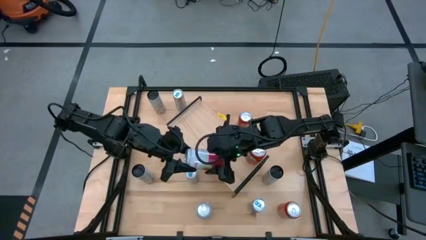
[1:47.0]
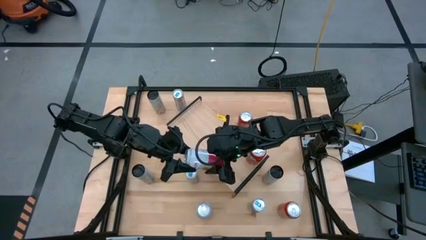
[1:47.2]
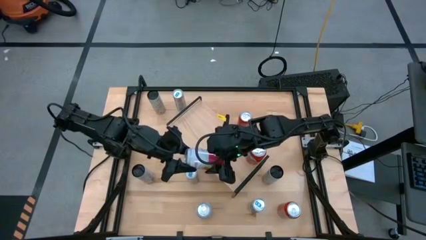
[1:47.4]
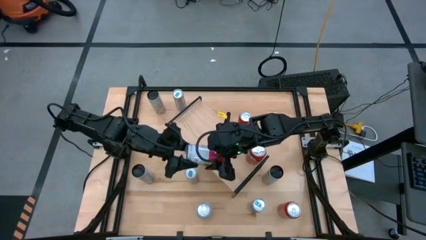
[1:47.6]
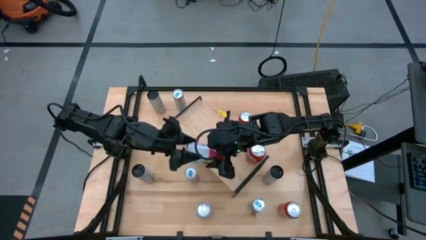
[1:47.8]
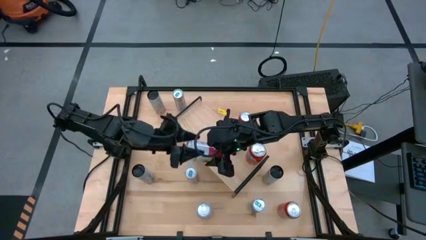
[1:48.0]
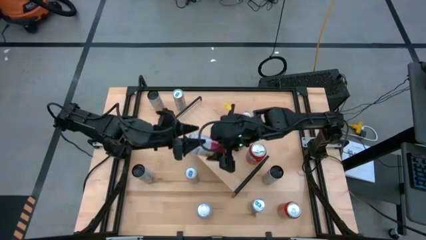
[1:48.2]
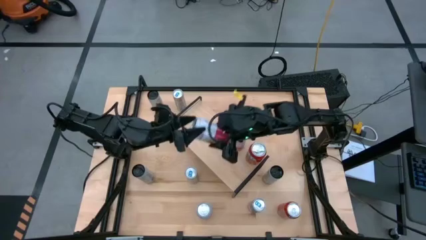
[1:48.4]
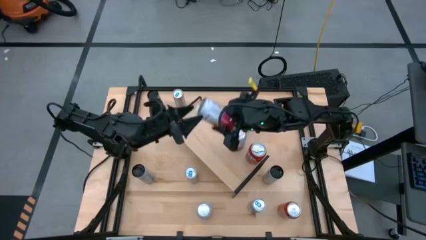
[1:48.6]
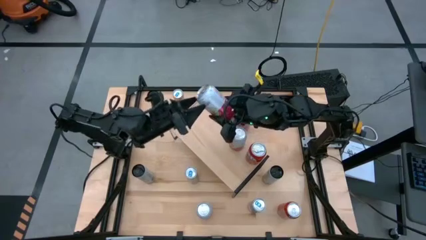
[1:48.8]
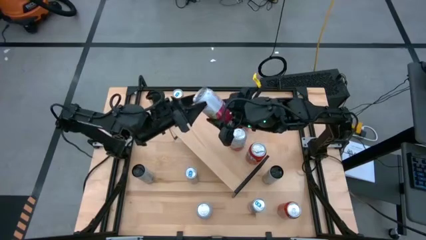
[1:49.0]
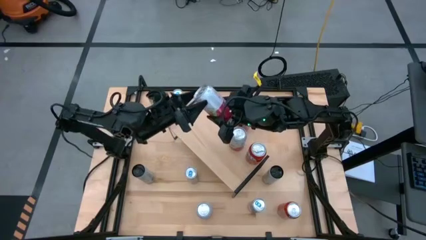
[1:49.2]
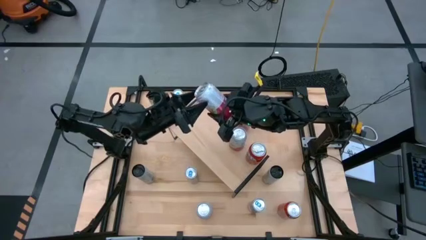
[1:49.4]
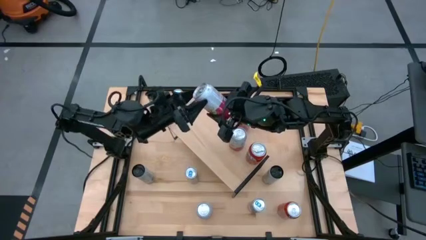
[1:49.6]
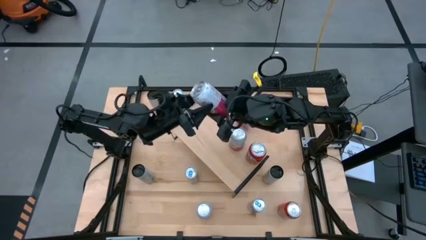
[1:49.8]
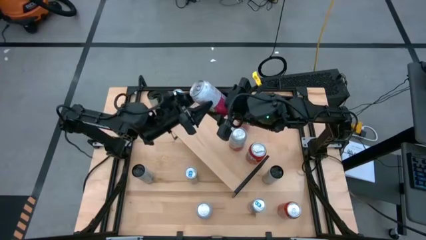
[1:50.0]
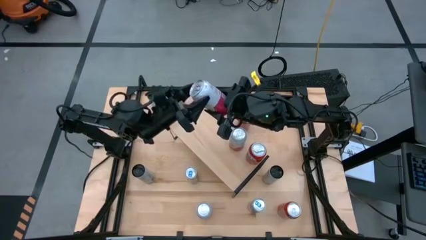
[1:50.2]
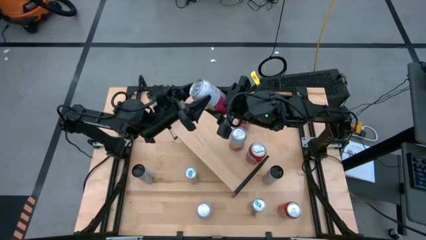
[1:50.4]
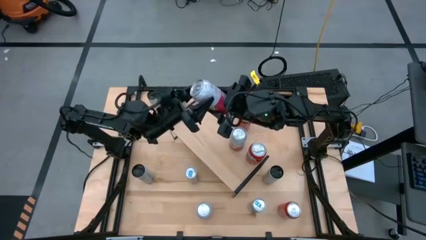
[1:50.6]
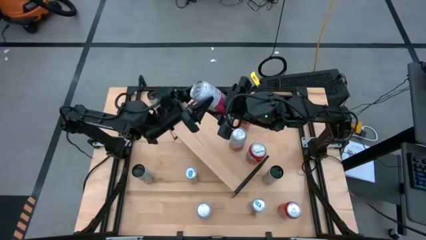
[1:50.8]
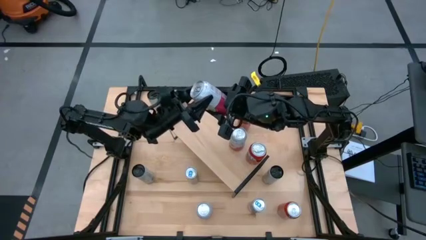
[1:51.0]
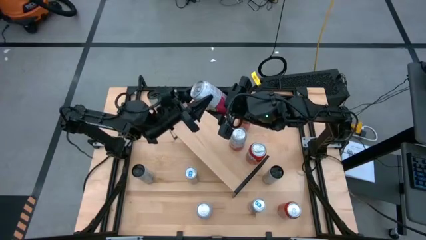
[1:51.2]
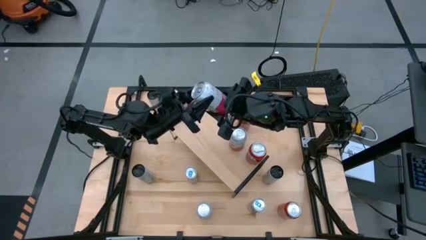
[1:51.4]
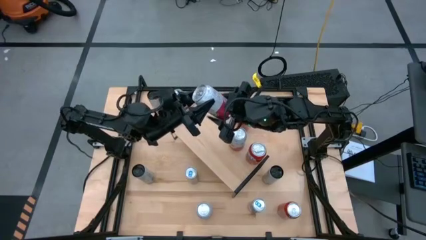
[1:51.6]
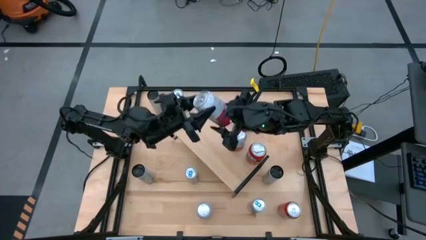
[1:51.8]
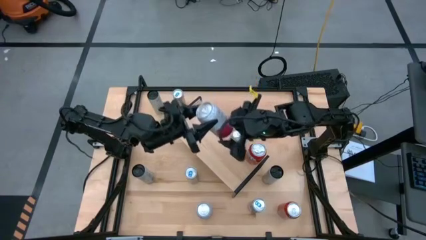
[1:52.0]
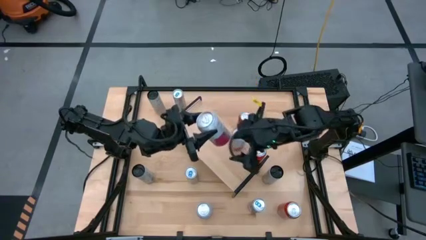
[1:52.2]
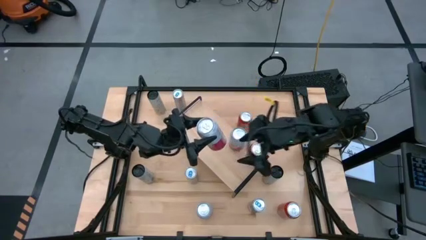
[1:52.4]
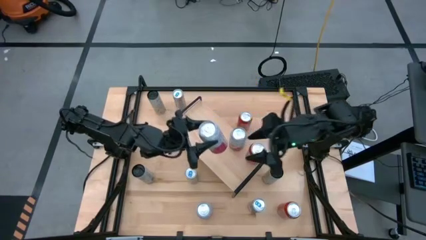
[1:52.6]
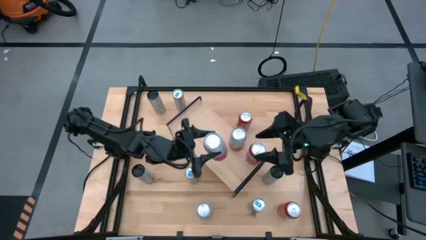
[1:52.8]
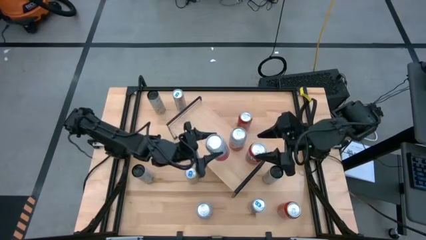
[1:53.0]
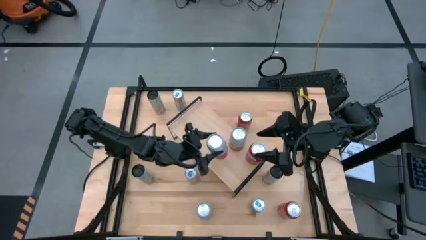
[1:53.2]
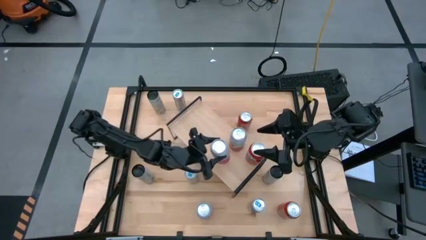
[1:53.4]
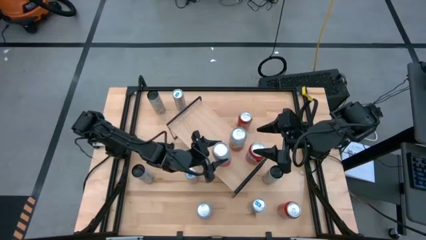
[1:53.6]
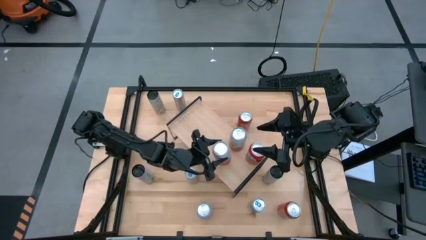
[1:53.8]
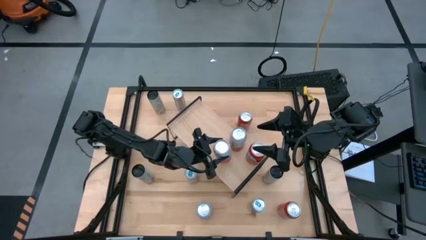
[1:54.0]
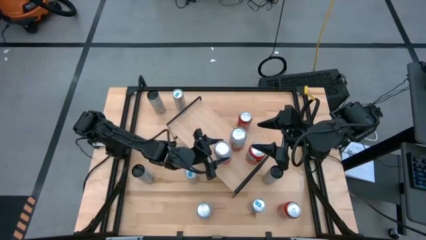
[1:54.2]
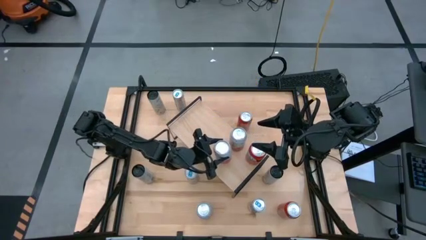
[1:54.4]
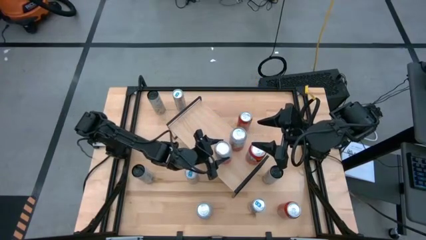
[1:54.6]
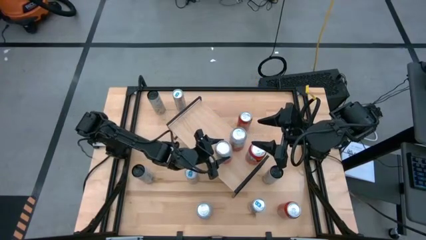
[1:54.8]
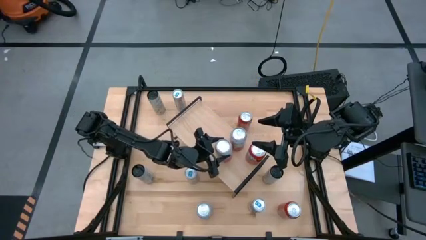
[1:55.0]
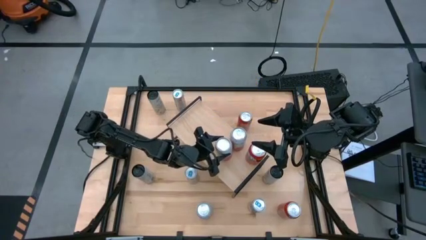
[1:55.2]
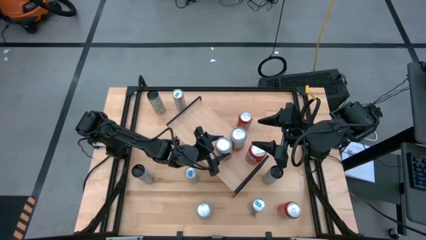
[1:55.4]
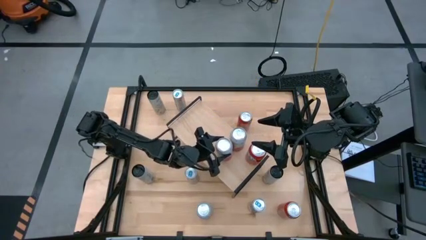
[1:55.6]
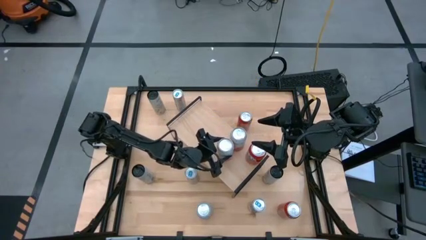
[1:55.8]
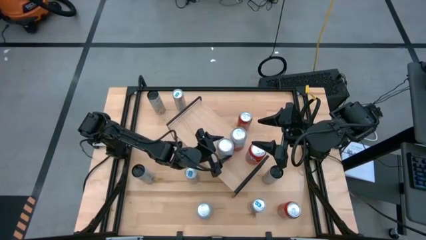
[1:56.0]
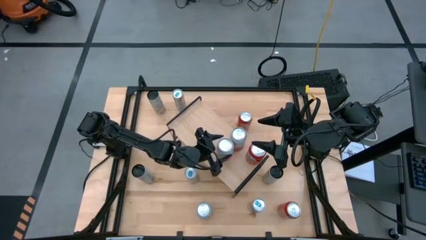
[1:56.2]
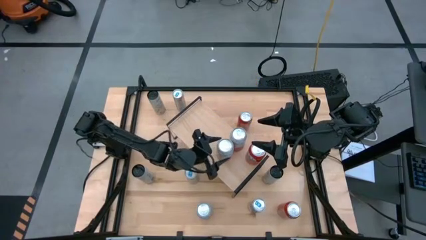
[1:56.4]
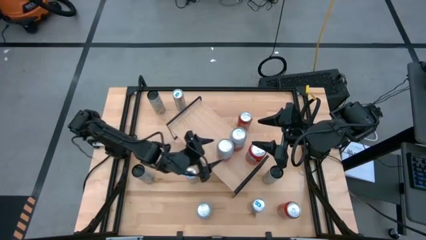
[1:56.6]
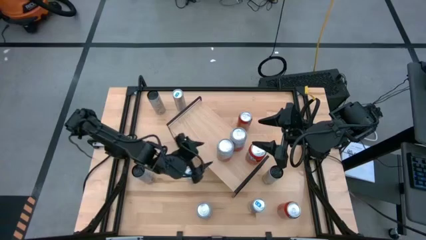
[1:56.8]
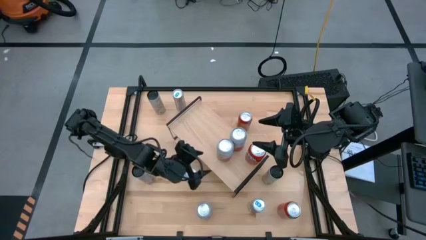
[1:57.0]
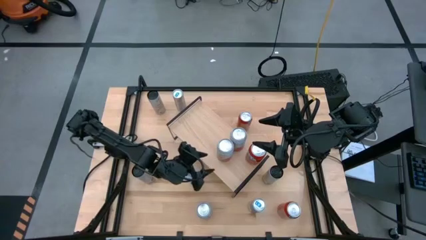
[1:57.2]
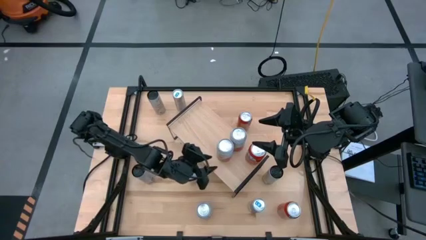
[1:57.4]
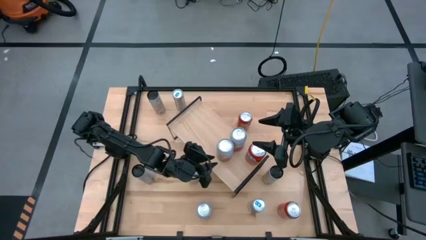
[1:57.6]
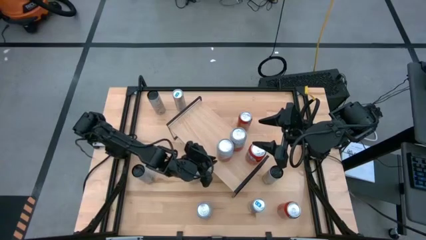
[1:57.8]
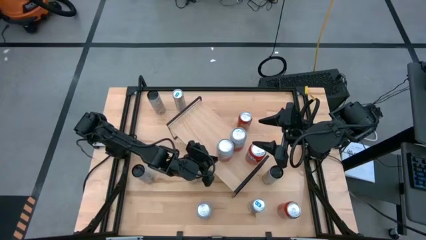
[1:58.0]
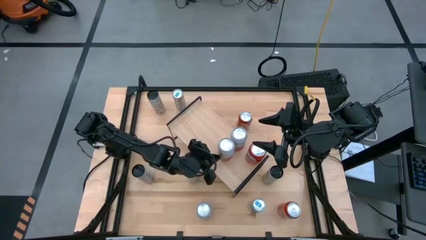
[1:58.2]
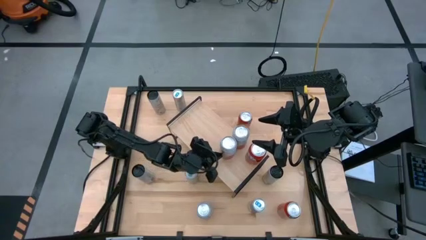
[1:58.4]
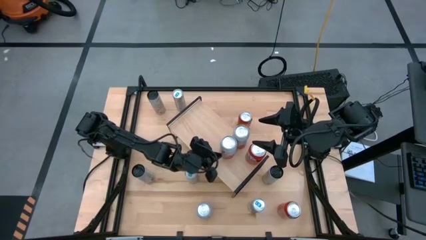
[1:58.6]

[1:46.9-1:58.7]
Task: Place canned beverage on shelf
Put the left pink white soda can on the shelf aligned with the other pink white soda can

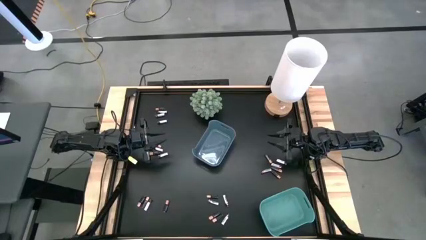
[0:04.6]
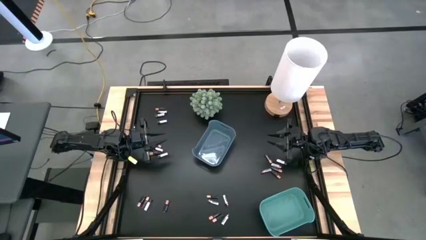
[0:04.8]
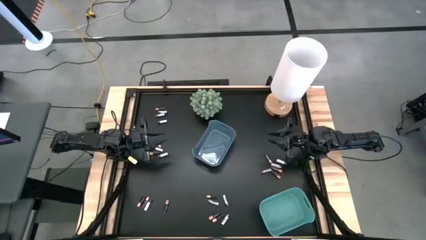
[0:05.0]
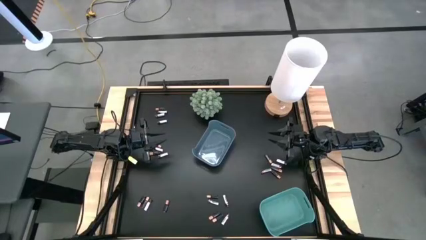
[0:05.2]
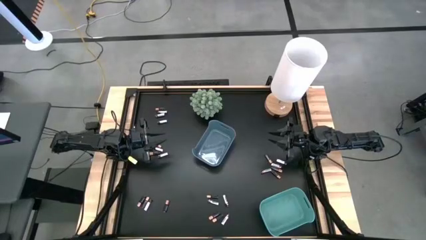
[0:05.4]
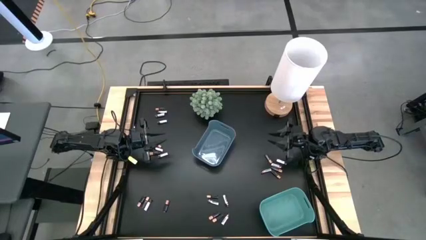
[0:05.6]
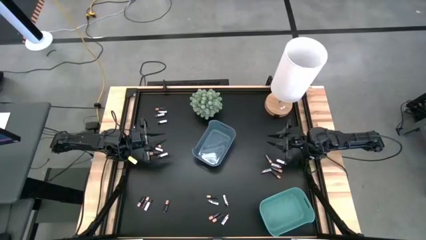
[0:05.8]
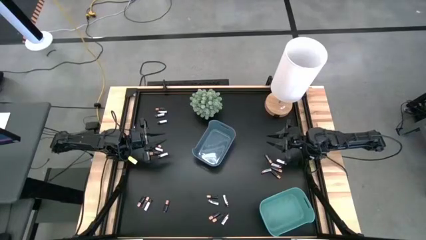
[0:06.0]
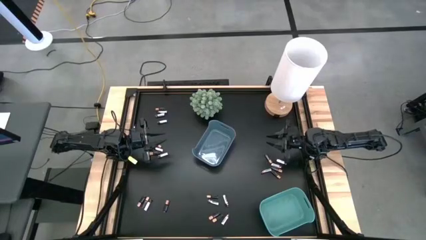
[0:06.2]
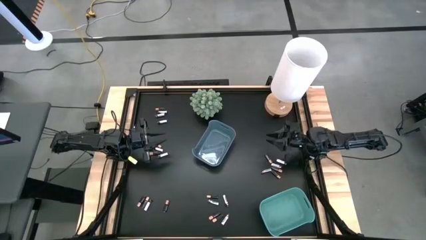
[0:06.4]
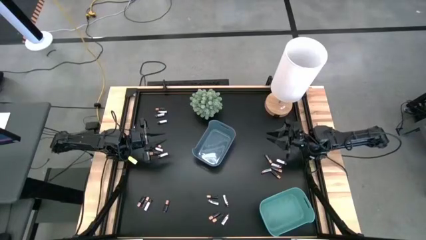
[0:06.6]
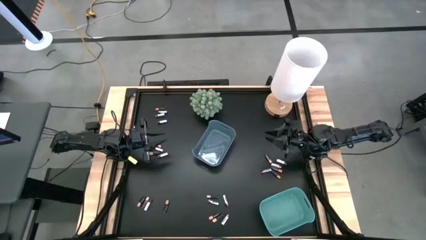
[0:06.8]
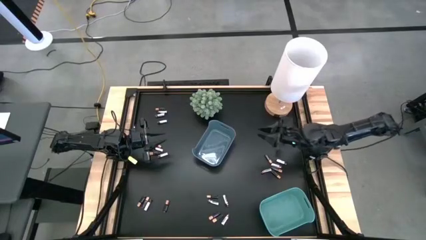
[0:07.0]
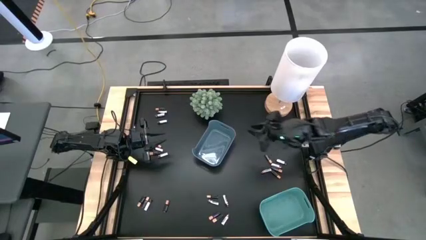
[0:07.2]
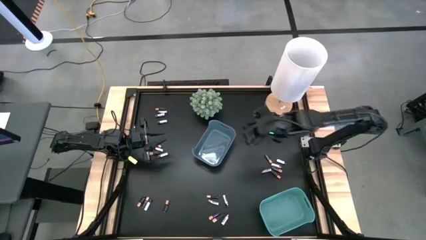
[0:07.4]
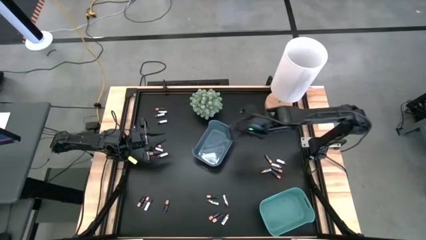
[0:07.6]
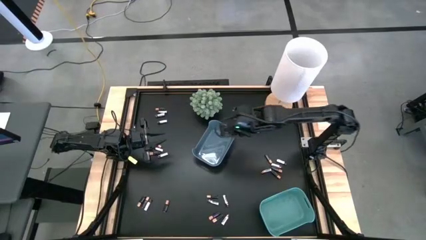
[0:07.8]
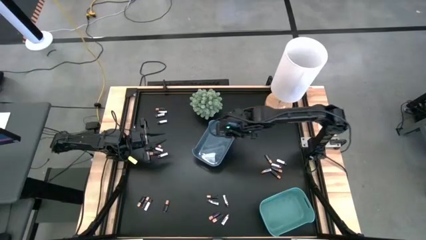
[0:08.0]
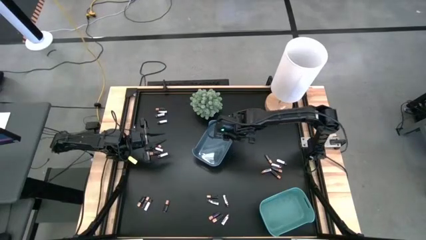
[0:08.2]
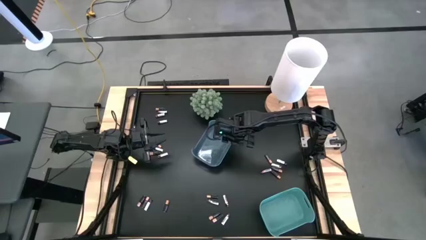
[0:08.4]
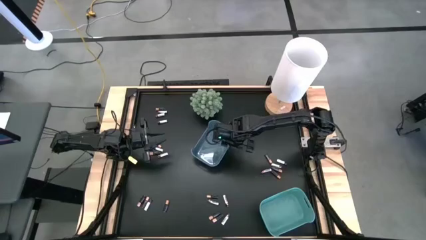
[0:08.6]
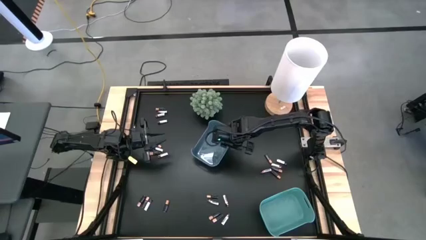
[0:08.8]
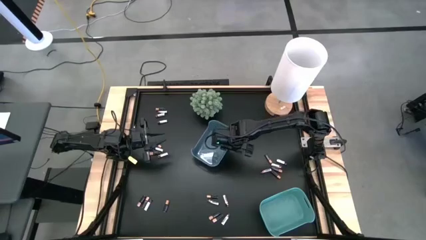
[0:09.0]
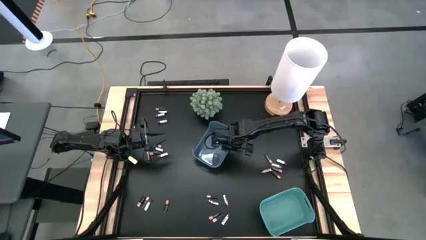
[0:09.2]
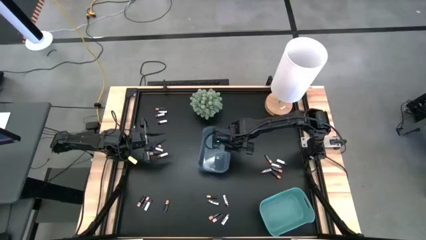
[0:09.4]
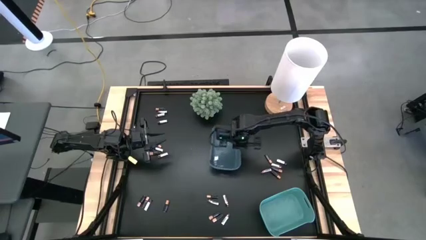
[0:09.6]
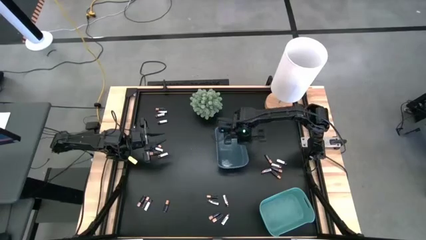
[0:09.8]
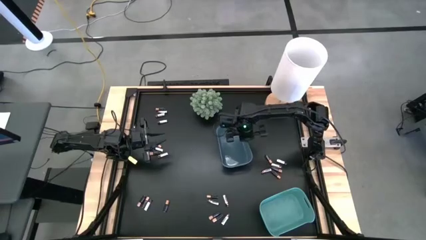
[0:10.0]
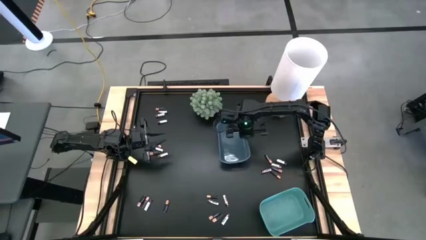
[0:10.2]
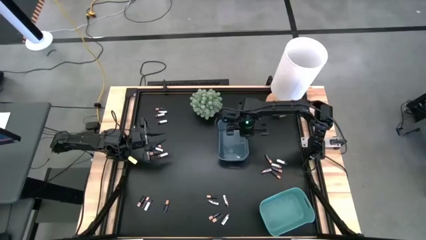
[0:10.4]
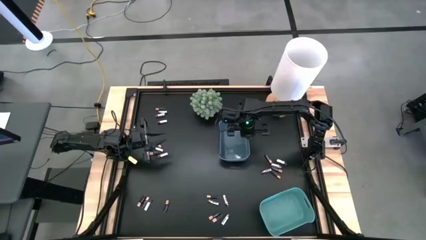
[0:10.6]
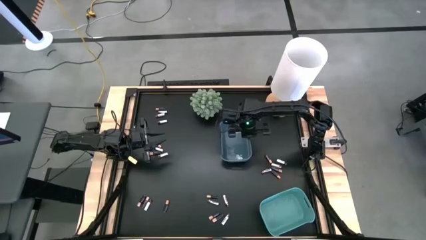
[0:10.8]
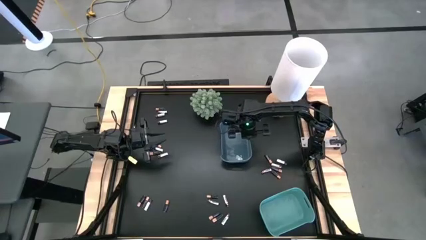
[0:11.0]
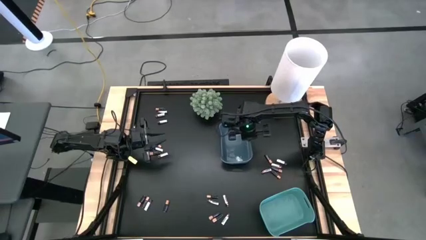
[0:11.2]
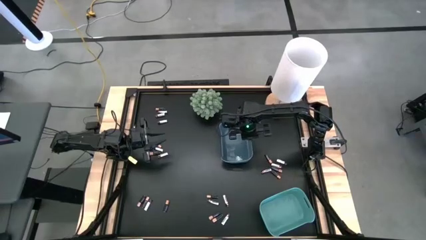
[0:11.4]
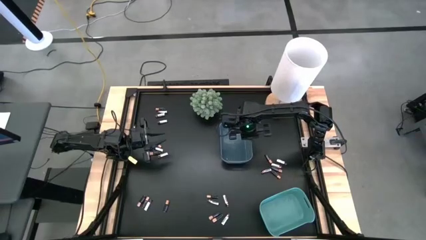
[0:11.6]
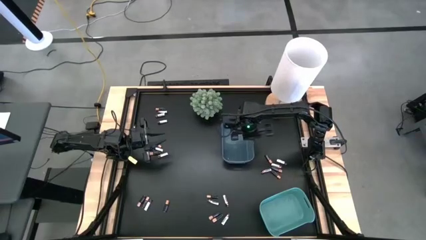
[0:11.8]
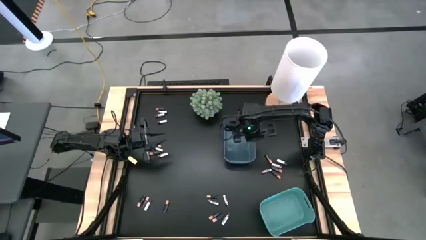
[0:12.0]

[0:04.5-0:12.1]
Task: Sort batteries
Adjust the blue bin on the table
